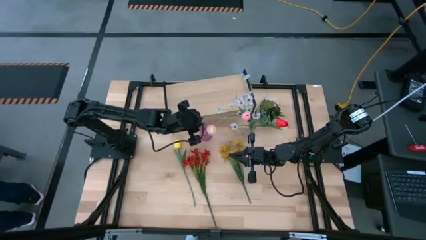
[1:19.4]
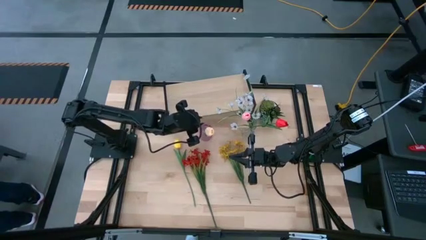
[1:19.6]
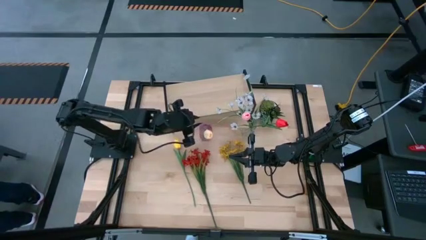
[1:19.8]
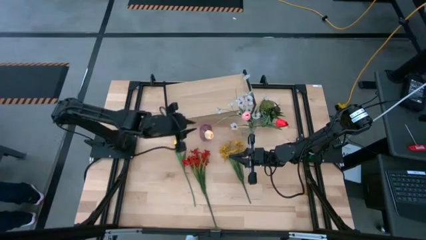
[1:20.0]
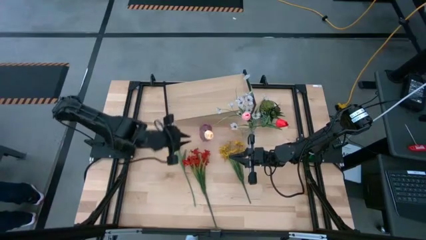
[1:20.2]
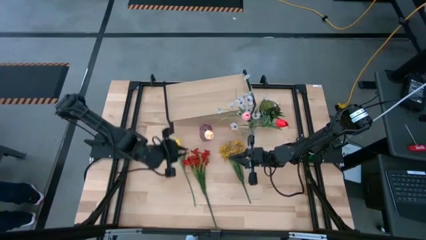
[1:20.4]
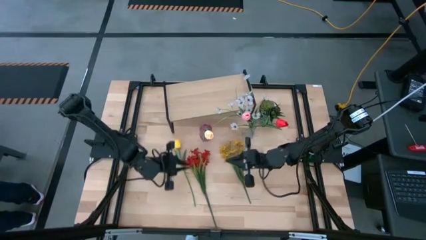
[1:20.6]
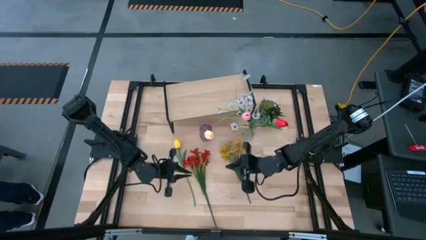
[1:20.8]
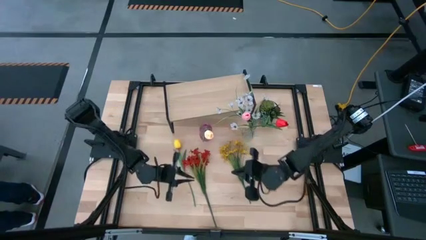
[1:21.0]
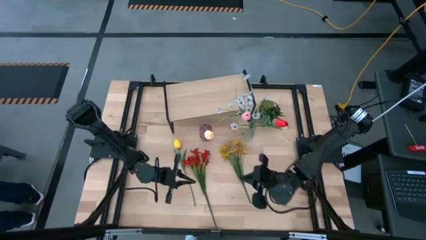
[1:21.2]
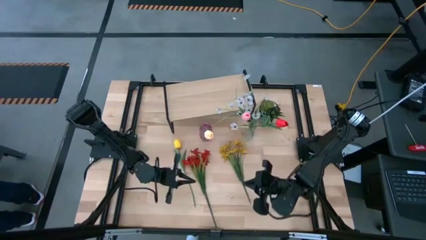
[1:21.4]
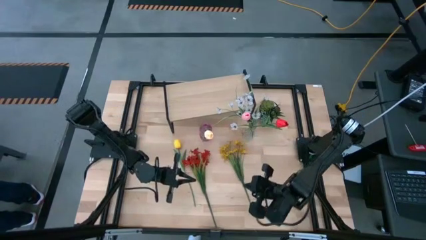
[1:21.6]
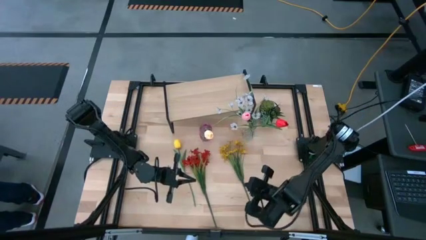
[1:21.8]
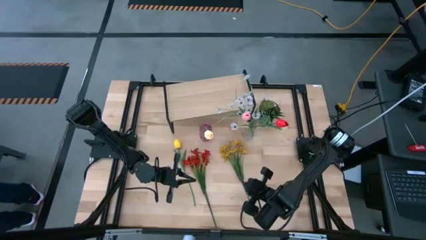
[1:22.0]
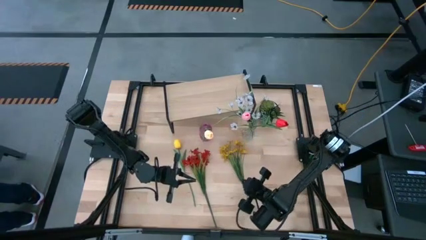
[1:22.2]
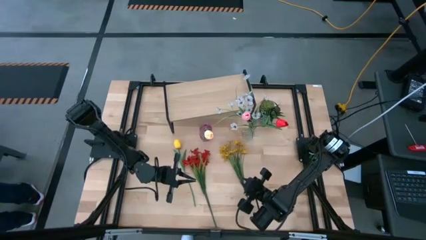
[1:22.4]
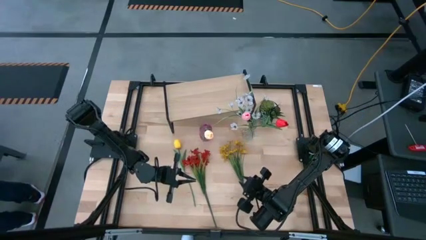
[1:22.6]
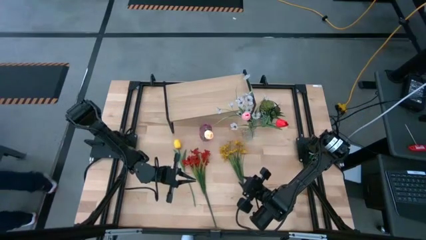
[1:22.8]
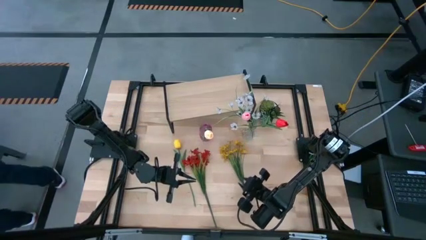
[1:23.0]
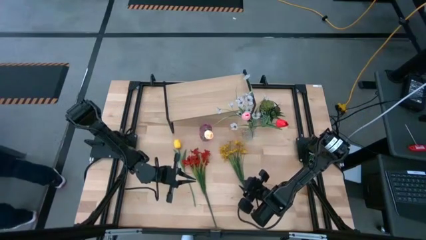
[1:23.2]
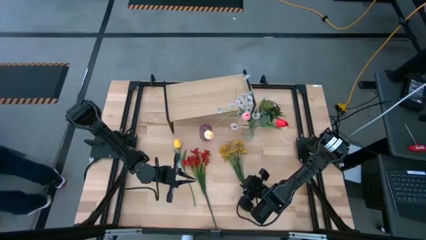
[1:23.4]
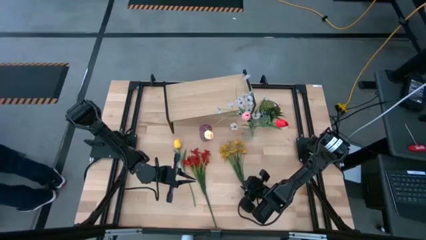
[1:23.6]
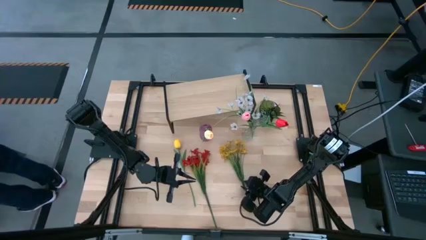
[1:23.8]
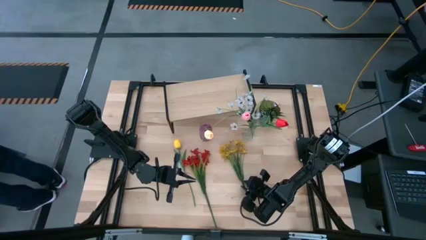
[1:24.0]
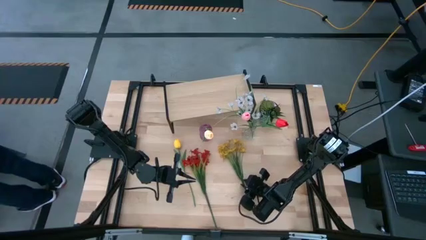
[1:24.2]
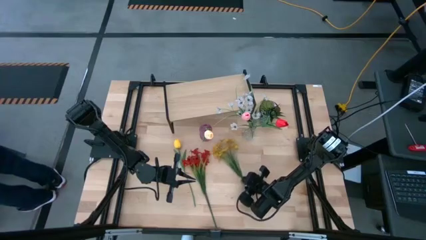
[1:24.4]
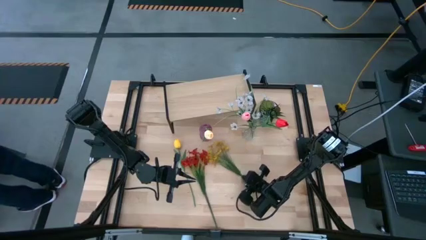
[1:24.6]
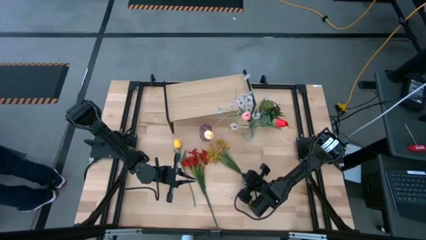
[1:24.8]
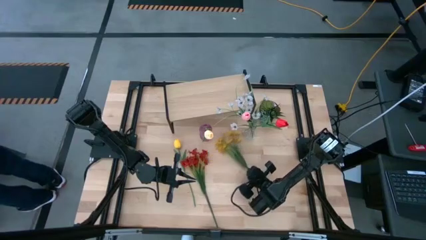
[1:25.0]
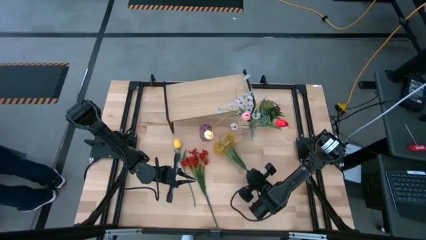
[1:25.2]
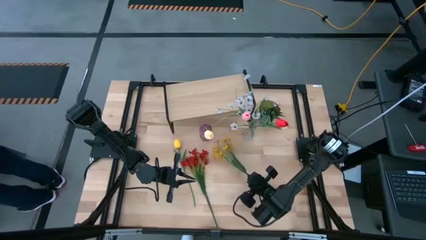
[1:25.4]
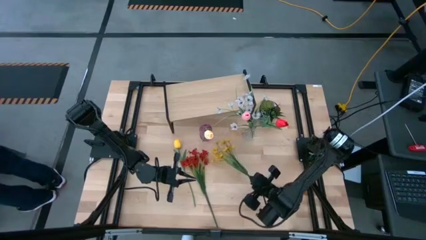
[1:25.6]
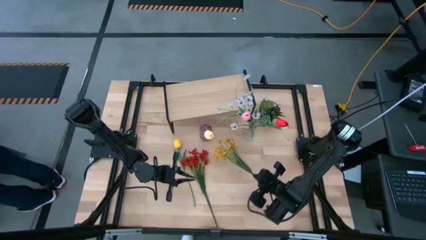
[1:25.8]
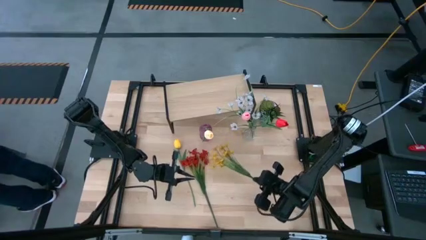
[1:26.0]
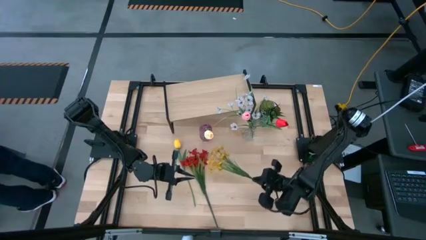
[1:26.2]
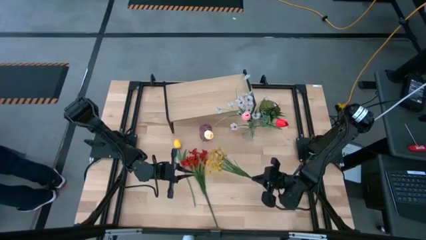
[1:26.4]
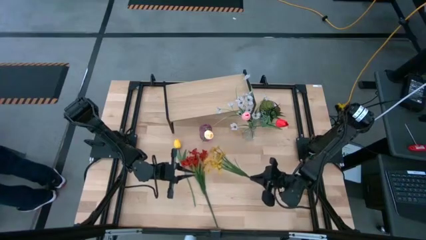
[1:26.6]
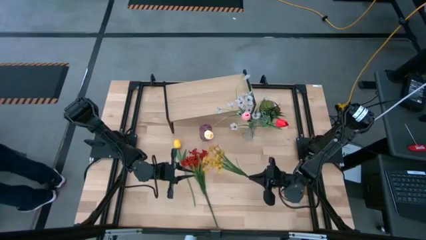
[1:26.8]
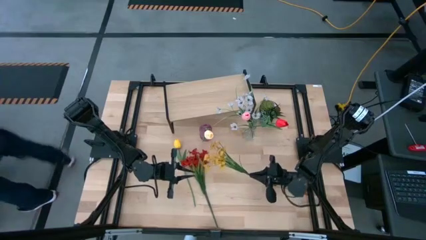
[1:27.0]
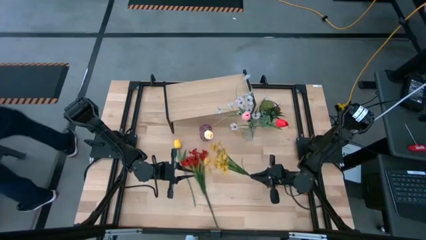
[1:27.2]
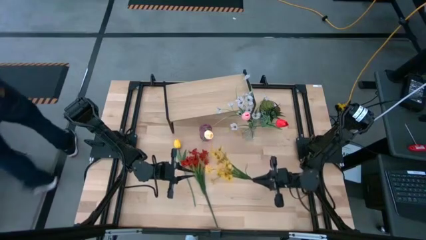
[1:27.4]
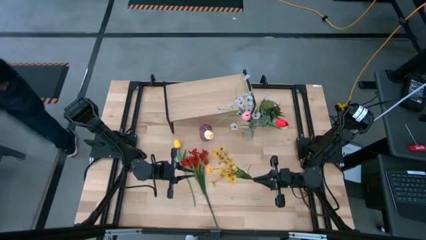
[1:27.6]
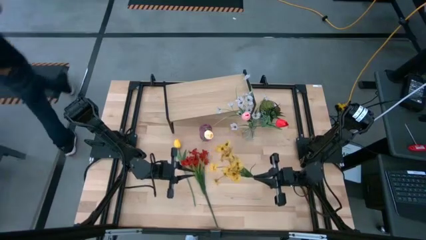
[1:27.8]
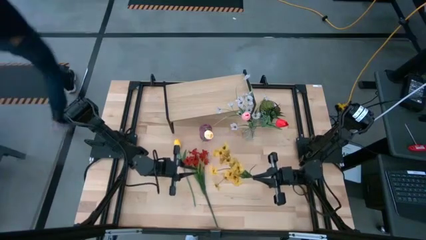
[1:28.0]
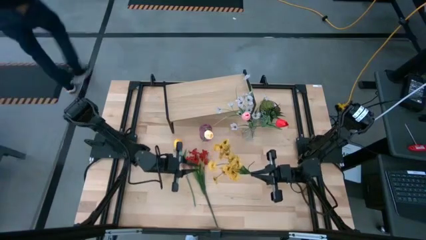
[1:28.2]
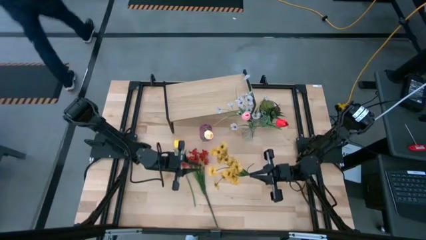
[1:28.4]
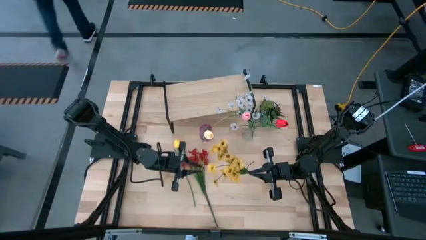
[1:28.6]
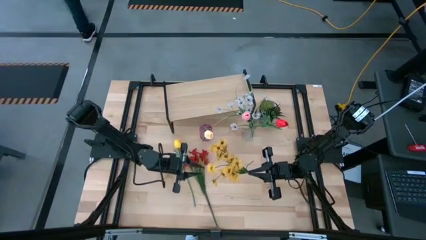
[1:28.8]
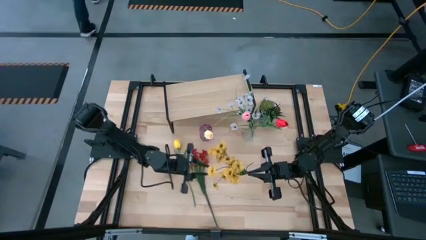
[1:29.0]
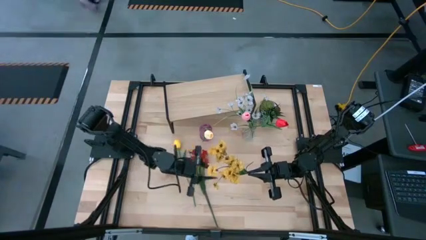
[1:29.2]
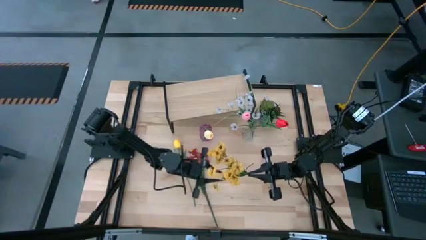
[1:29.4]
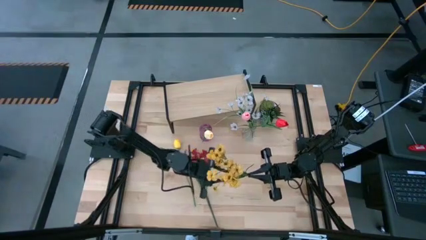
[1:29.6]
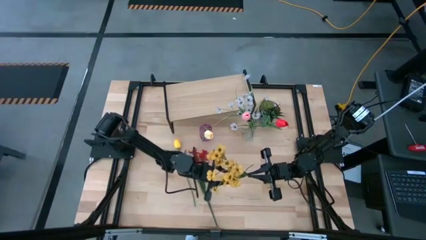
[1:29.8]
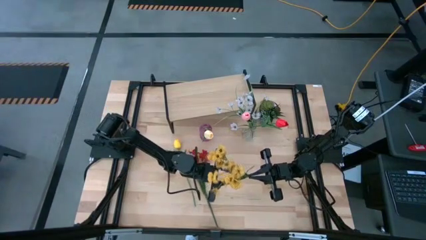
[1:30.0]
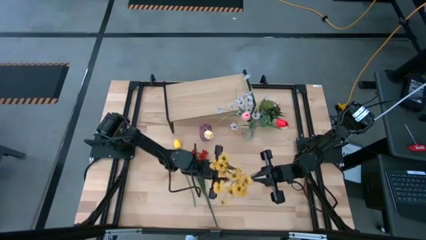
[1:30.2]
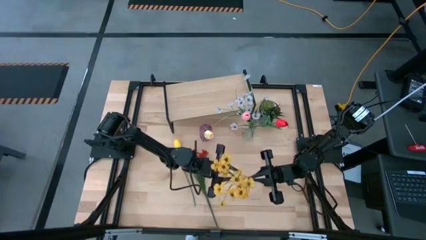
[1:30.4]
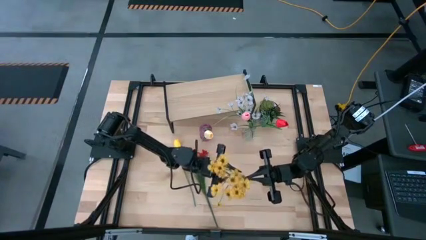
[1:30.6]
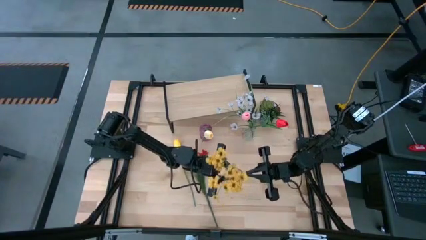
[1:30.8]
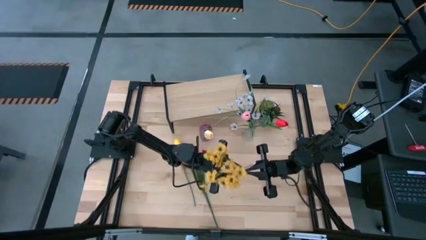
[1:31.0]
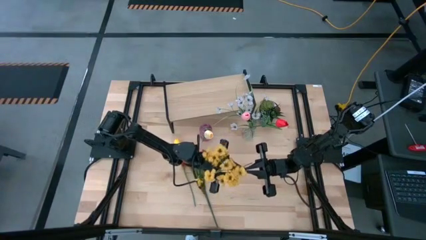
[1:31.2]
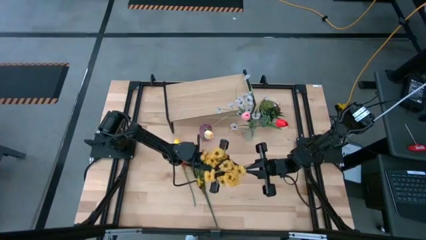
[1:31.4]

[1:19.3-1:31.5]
Task: Pick and place flowers into a vace then onto a shelf
Put the yellow flowers into the transparent vase

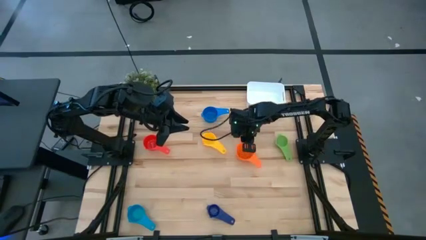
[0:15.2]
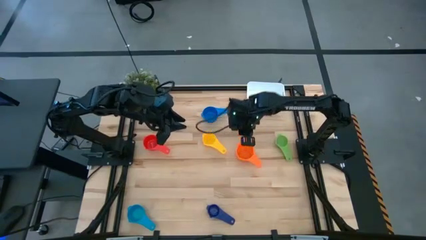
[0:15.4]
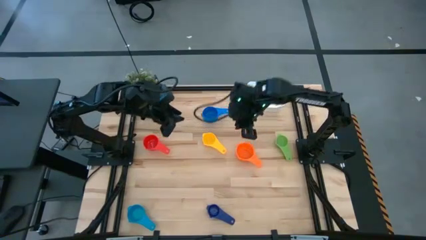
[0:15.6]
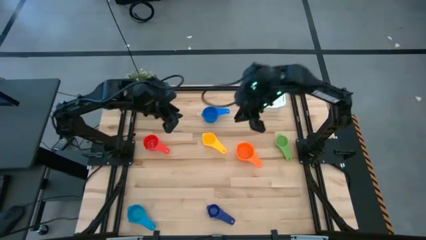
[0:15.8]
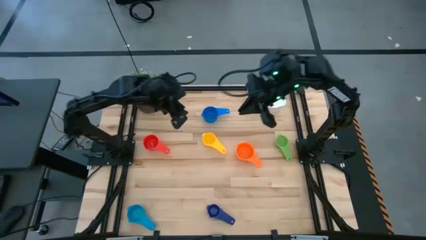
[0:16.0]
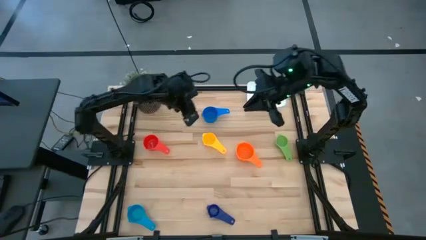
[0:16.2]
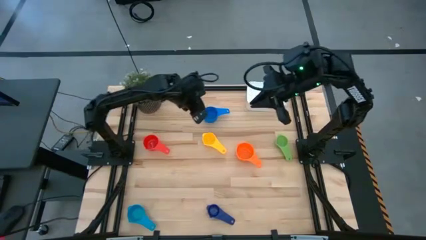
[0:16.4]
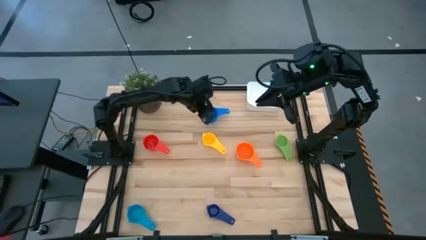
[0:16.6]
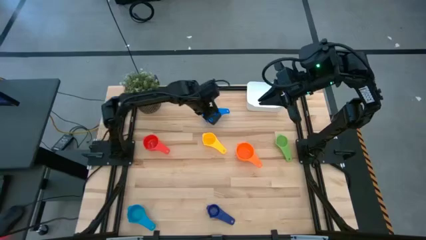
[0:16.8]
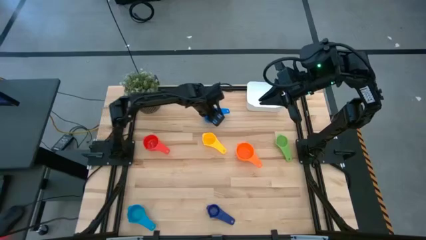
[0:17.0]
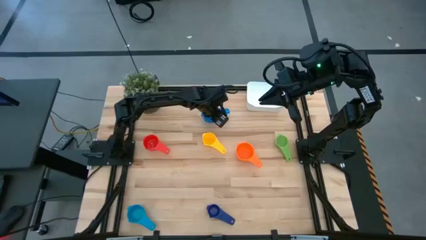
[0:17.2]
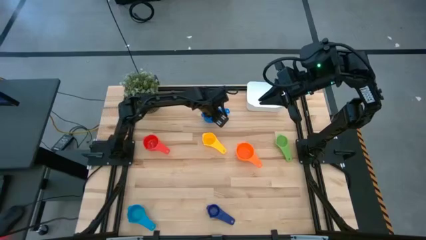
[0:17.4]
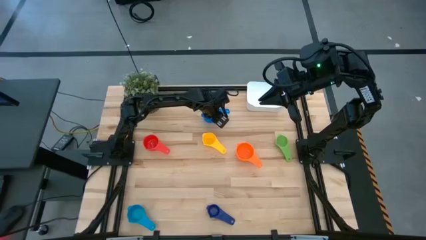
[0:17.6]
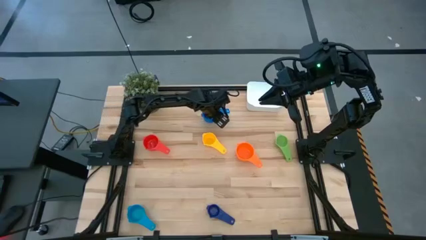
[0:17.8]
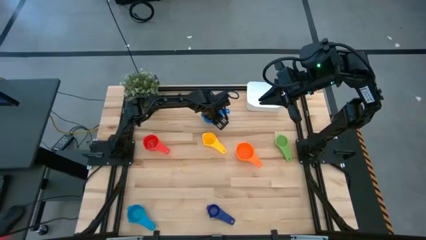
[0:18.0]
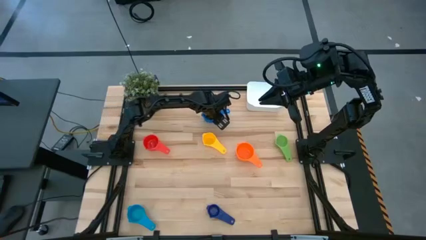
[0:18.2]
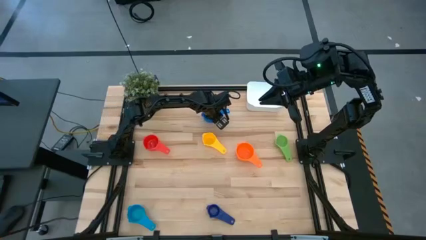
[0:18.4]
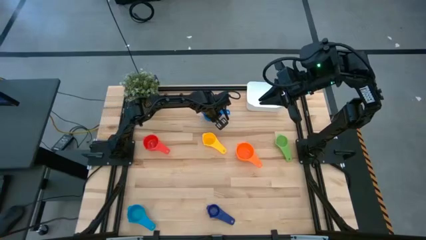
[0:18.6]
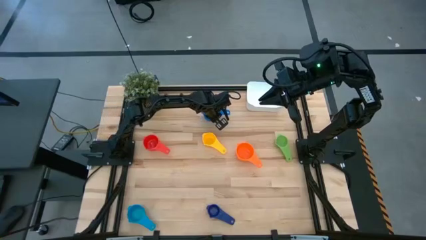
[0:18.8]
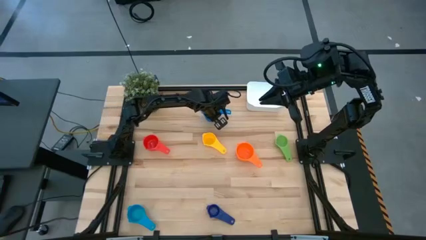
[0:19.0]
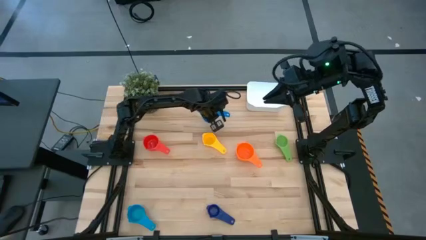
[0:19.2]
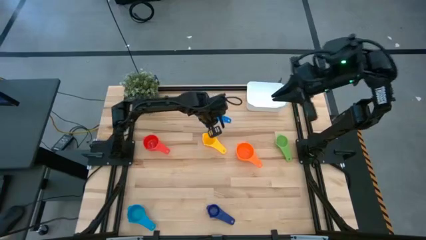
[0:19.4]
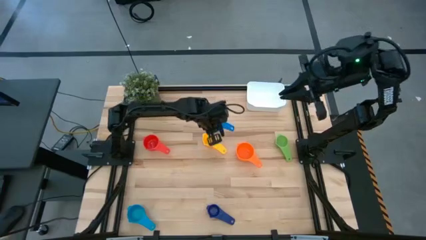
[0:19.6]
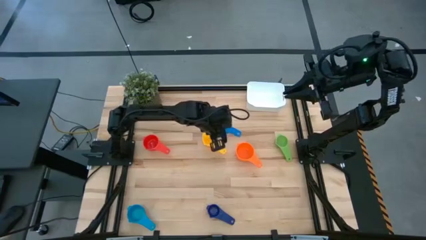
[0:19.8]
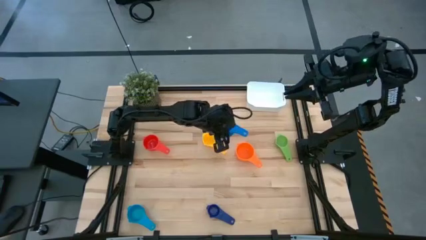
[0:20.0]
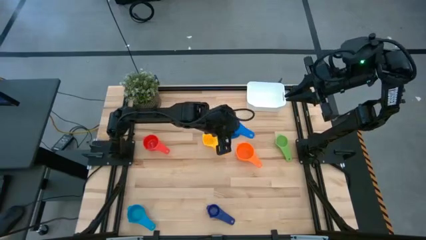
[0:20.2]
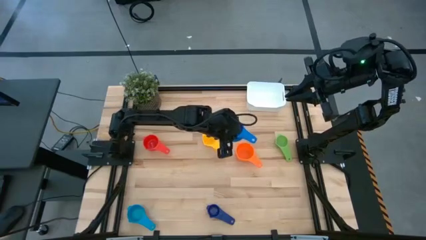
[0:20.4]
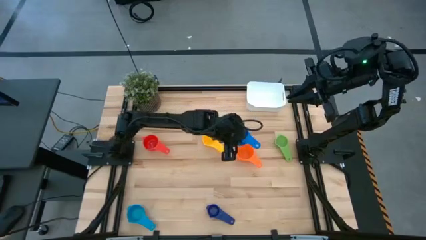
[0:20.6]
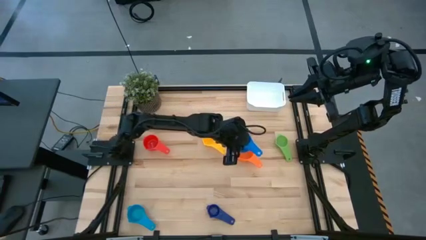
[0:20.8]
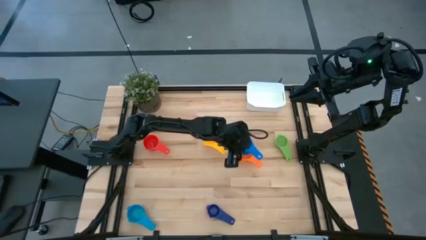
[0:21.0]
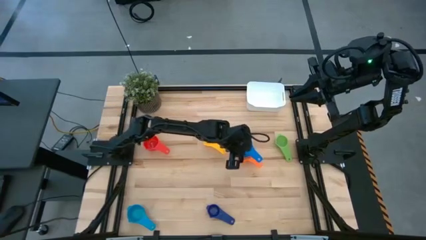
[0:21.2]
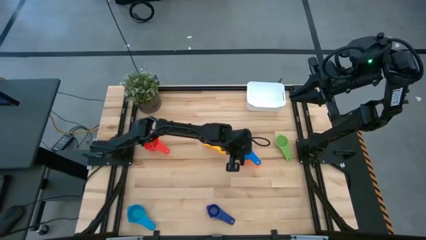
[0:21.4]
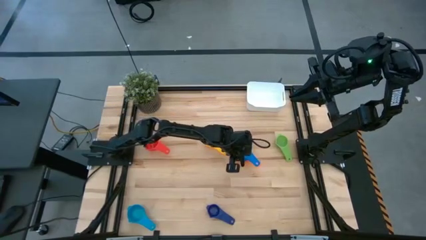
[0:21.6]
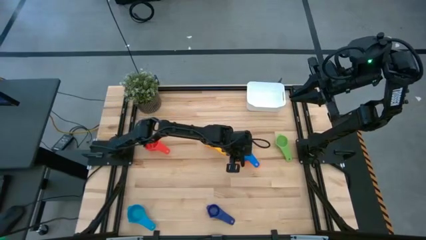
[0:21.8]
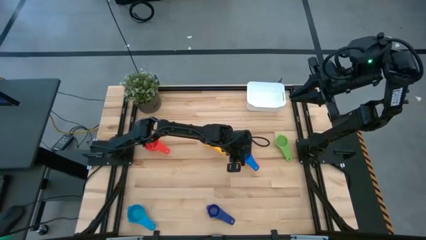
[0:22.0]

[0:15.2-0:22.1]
Task: Nest measuring cups in basket
Stack the blue measuring cup on top of the orange measuring cup
